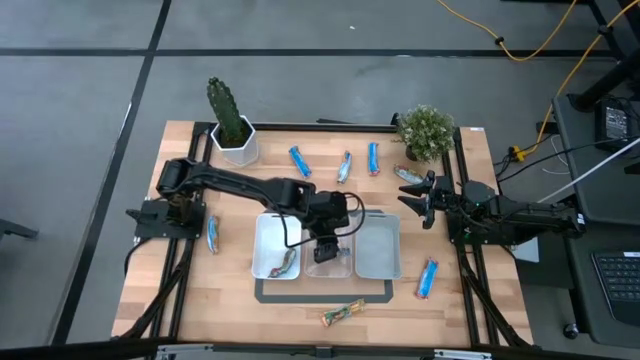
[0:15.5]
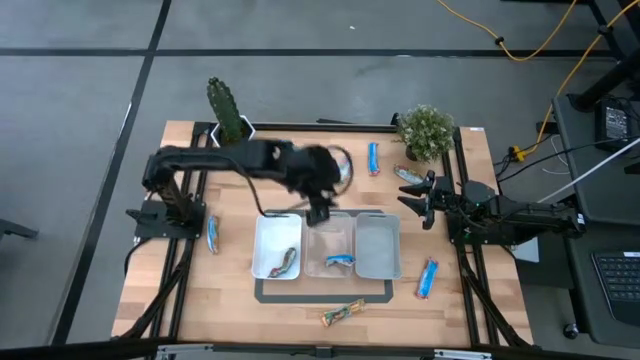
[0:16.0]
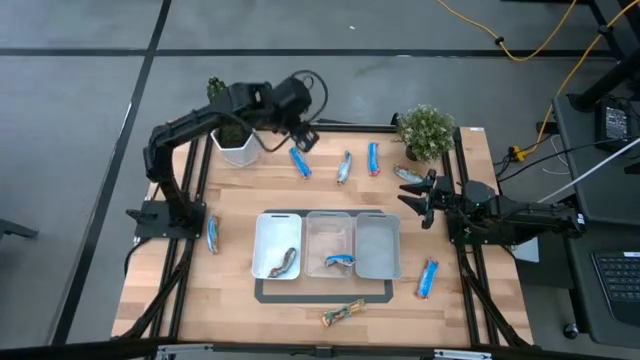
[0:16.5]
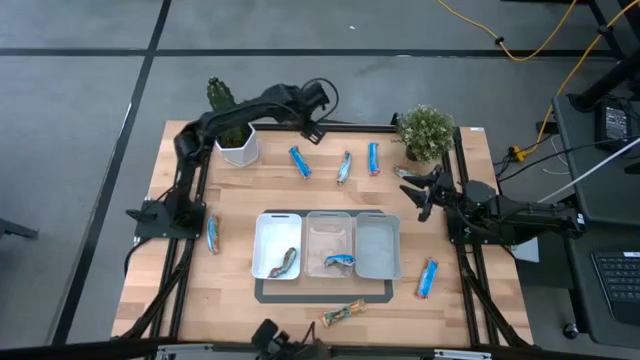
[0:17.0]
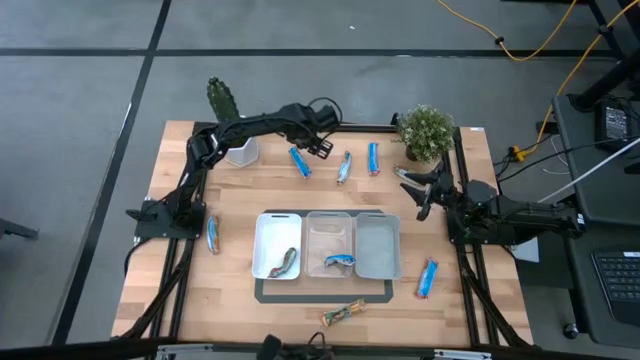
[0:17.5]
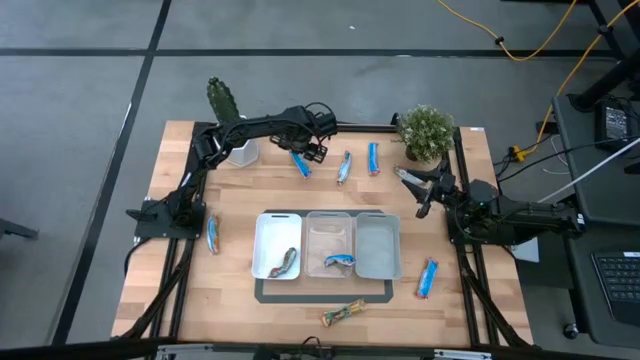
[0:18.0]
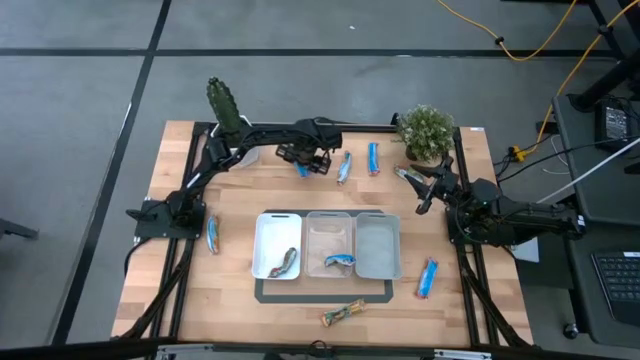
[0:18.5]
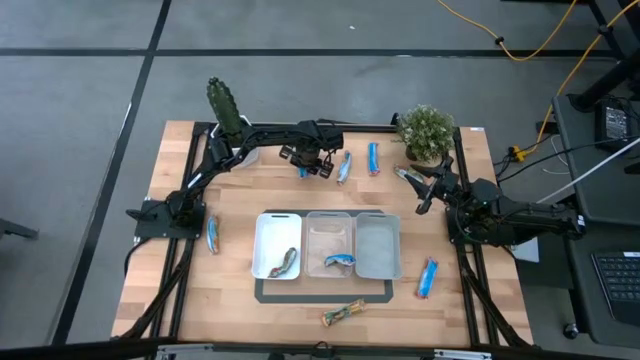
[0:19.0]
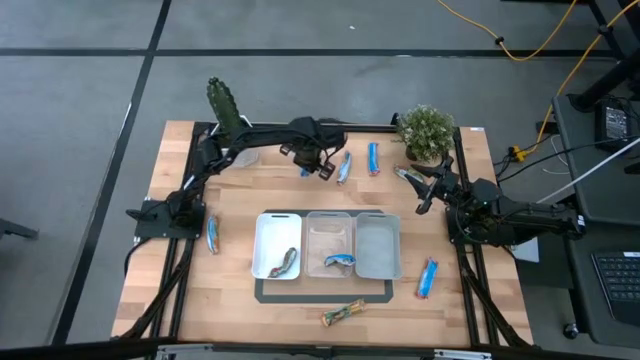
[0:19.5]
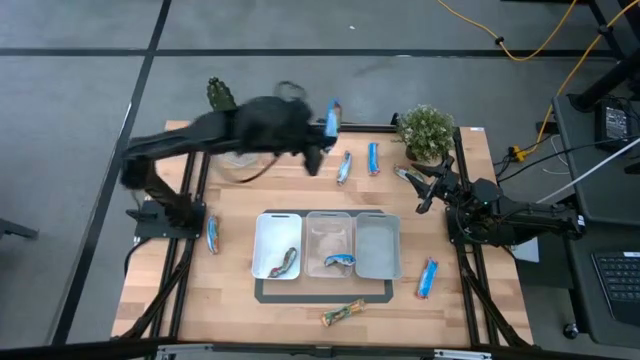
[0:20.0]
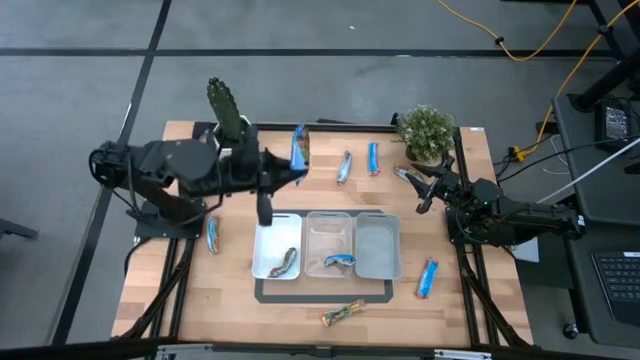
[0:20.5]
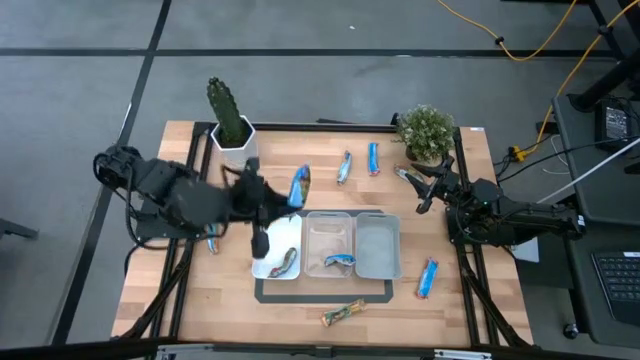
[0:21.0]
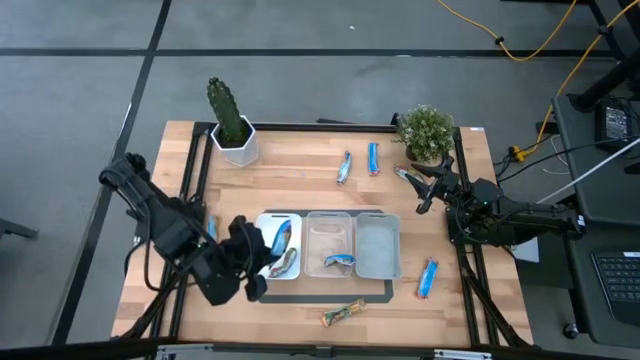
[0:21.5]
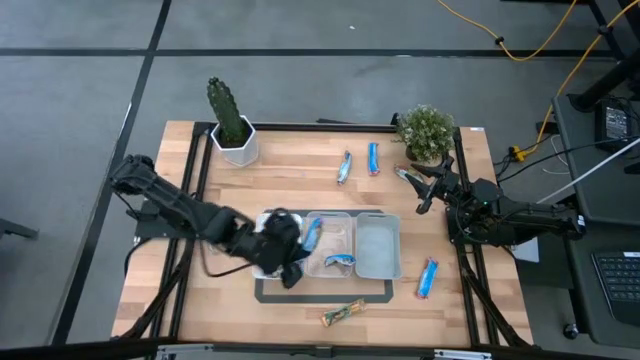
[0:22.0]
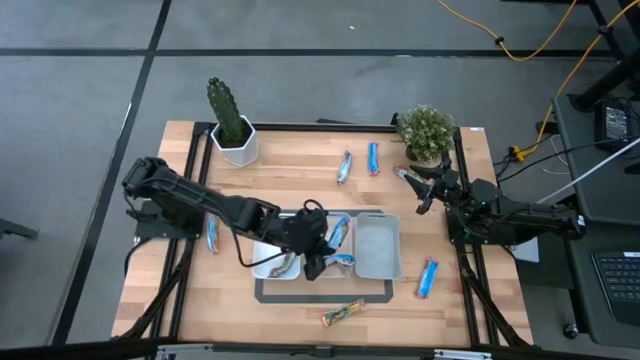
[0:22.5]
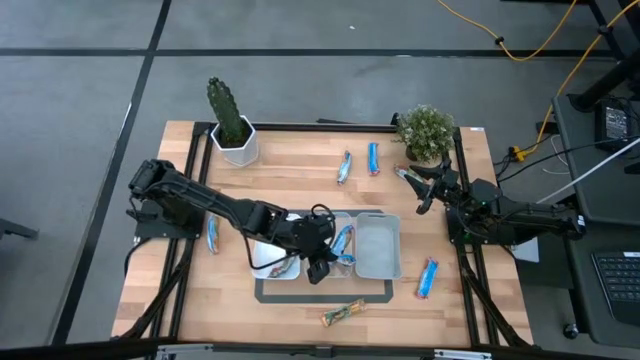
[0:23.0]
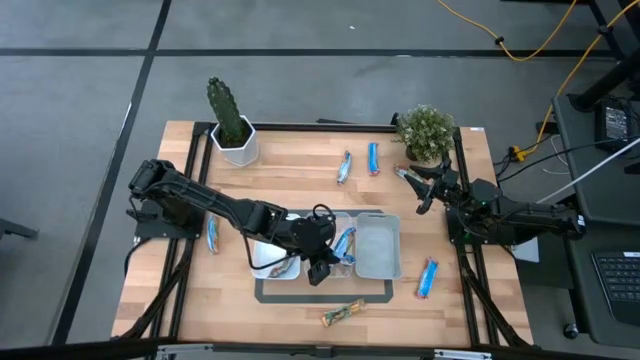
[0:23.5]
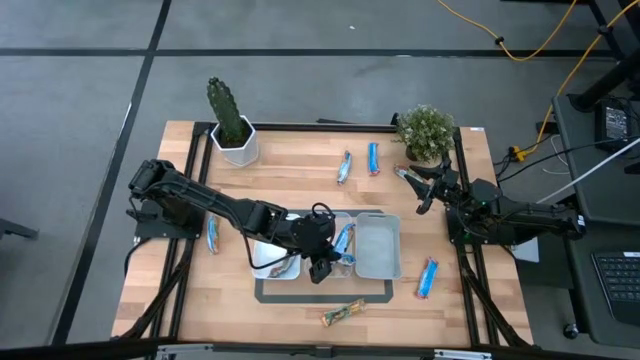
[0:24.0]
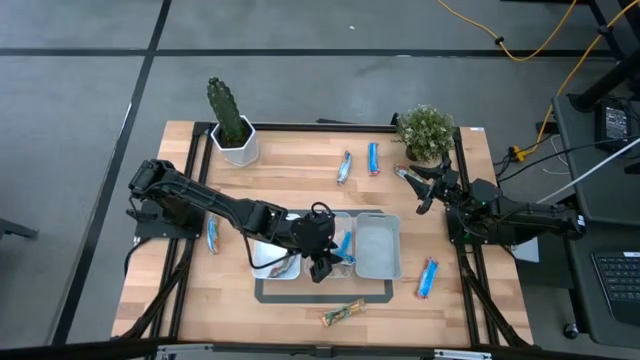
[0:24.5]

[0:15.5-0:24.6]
Task: Pick and place Granola Bars by type
Put the blue granola bar into the transparent bin

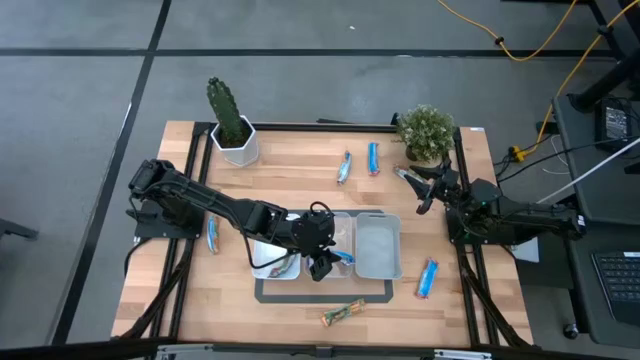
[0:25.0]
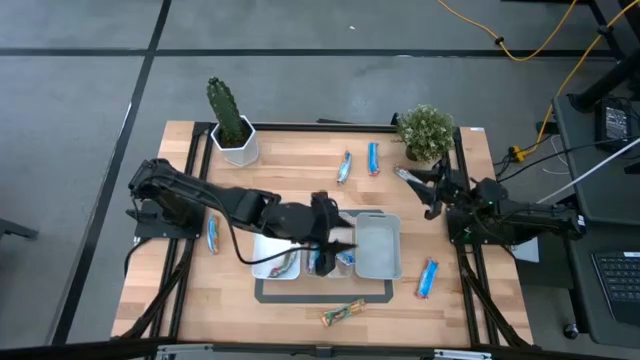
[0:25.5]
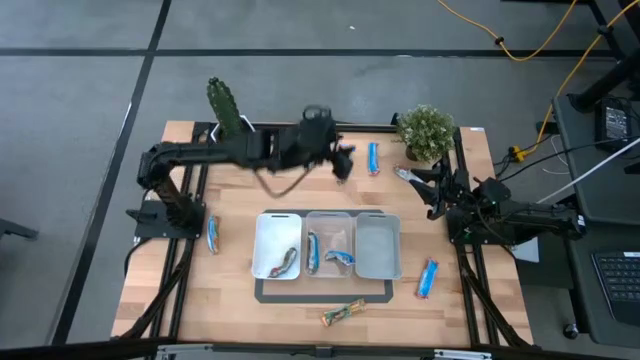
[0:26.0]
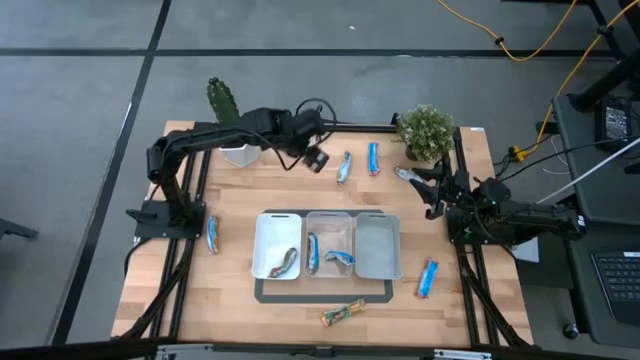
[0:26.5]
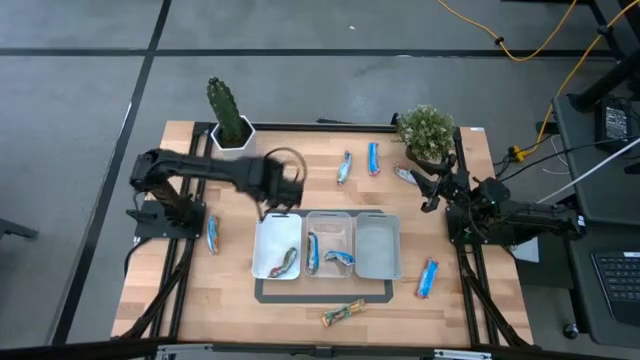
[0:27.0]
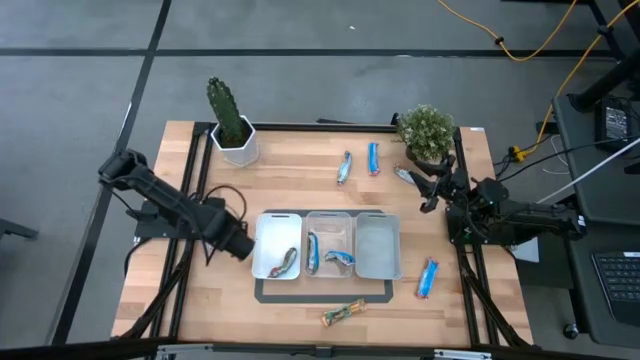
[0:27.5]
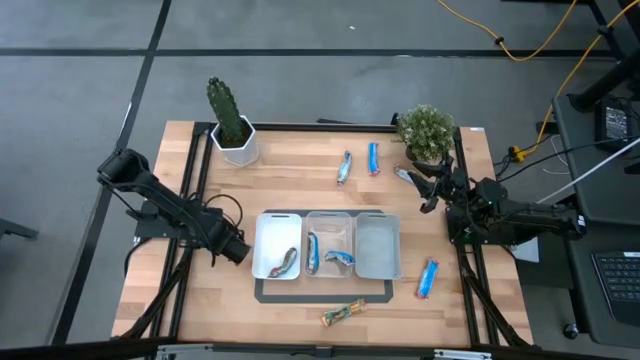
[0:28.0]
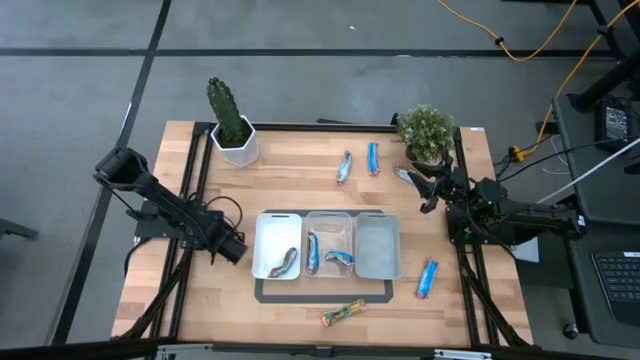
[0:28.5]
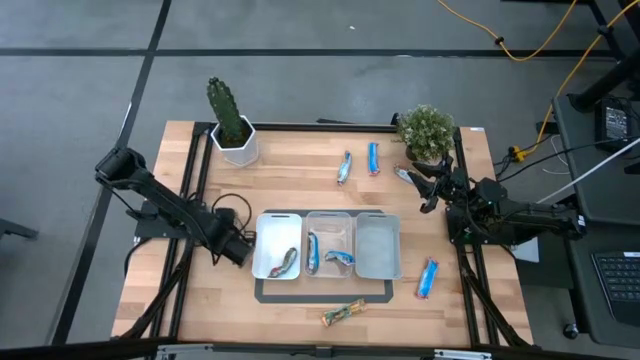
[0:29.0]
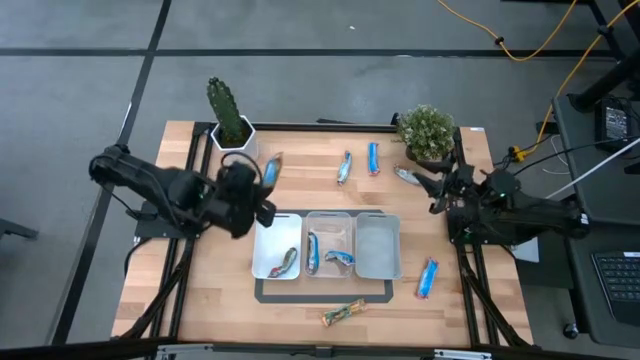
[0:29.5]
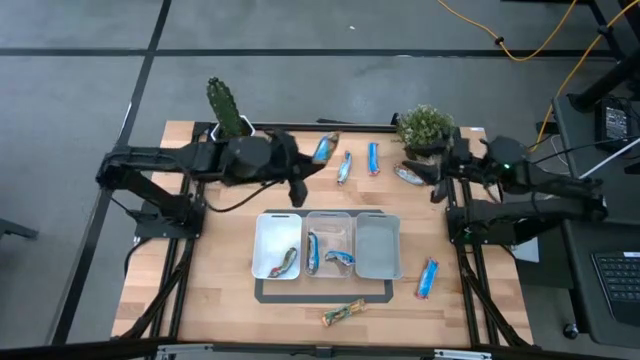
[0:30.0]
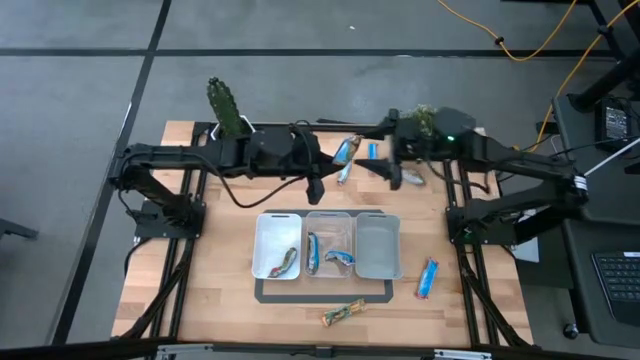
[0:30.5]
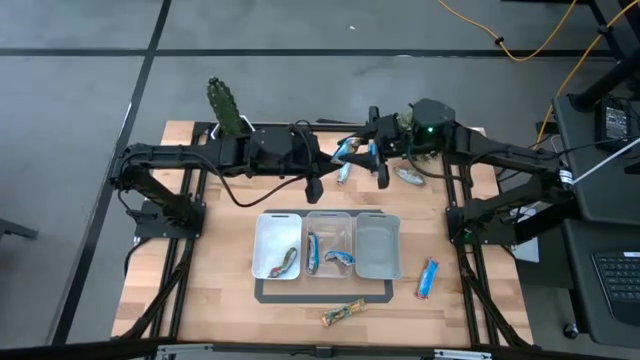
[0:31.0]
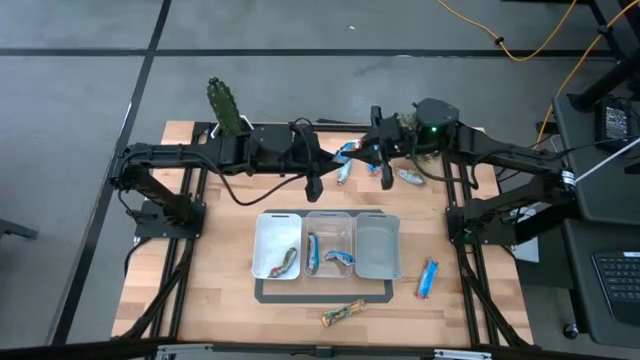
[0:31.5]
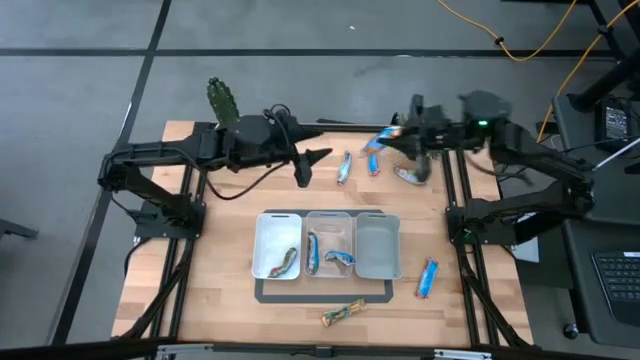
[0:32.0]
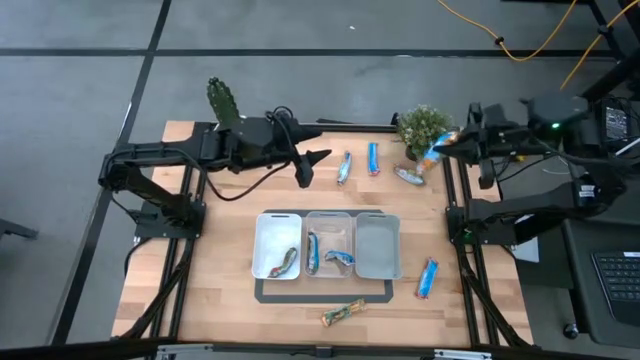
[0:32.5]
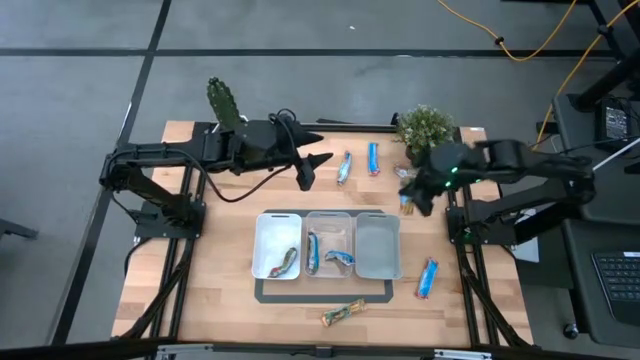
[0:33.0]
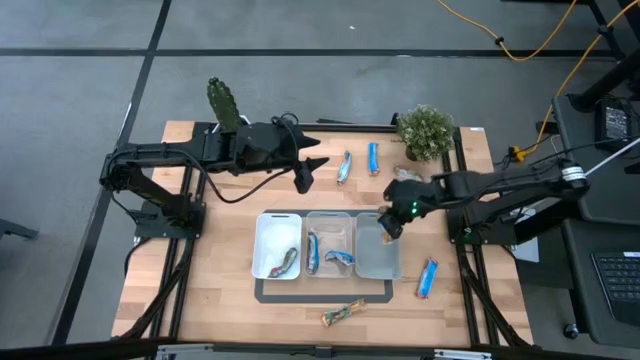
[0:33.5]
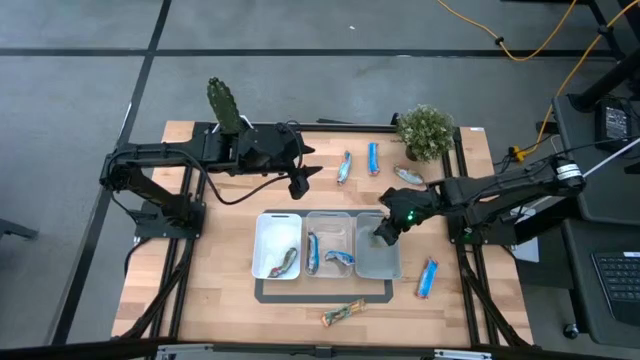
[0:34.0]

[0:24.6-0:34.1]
Put the yellow granola bar into the gray bin

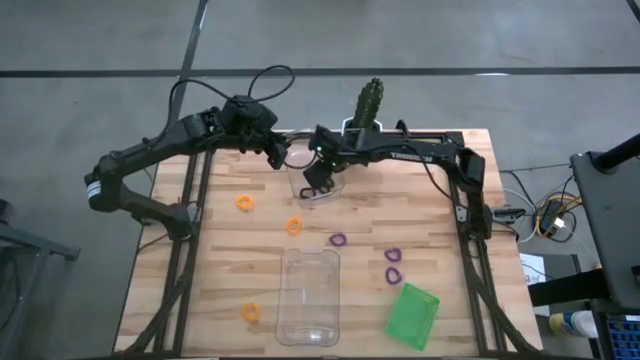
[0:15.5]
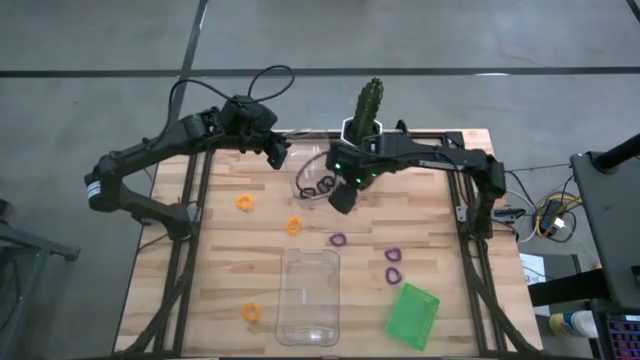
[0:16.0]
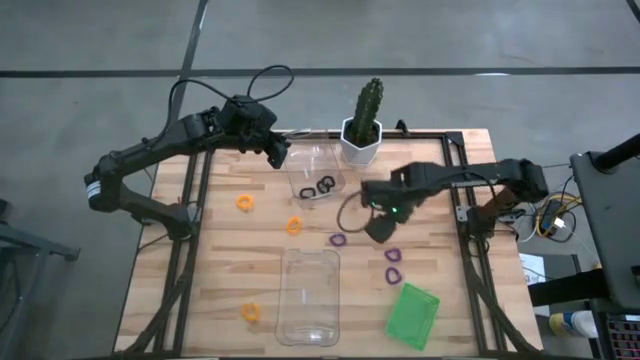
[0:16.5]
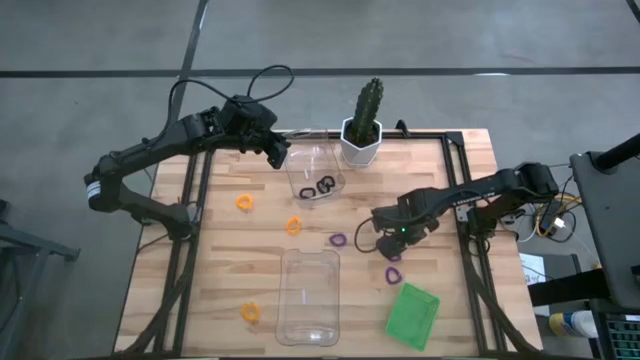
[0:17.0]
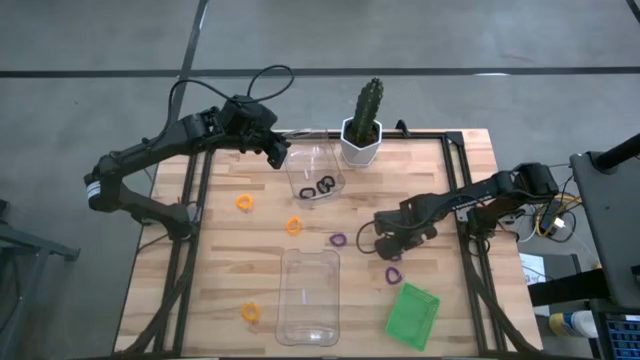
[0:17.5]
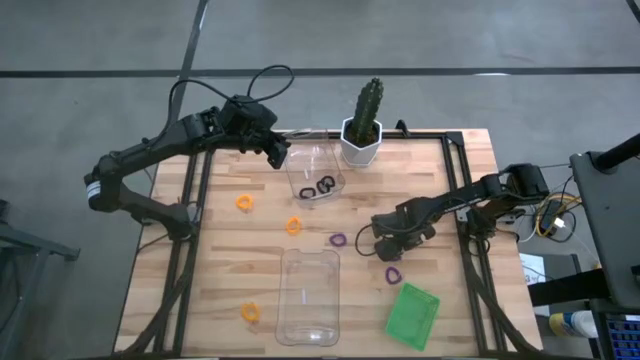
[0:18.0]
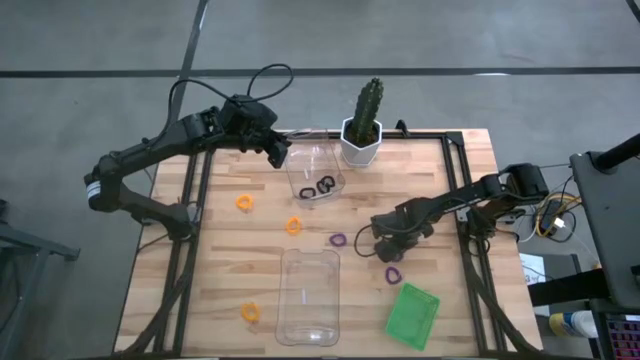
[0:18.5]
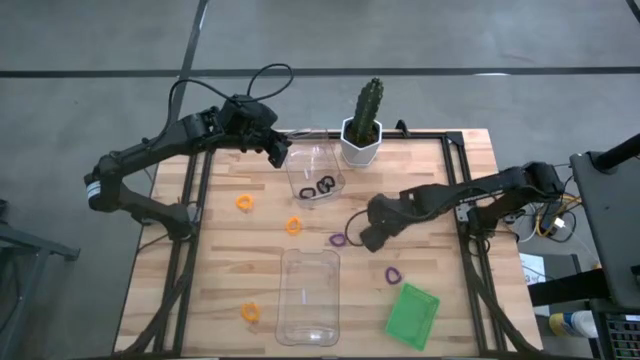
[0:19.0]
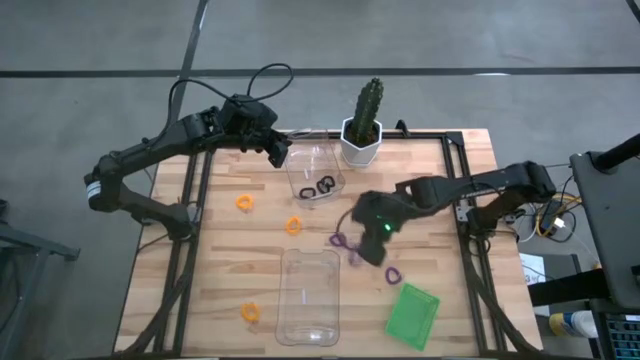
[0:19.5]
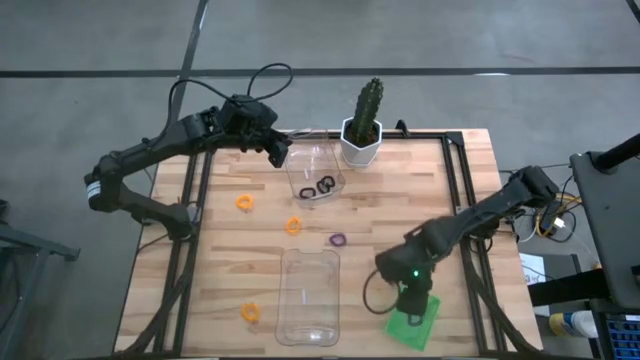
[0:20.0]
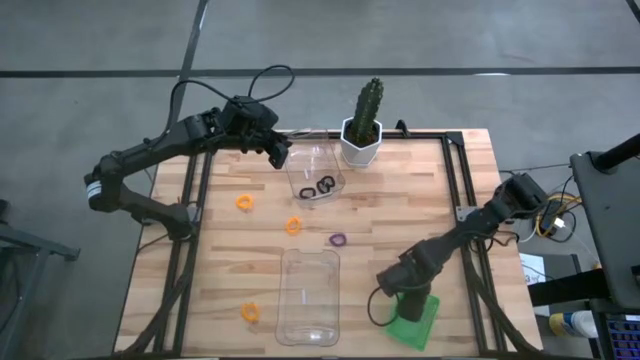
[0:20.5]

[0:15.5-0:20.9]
Task: Sort spring keychains
Put the top right purple spring keychain into the green bin
